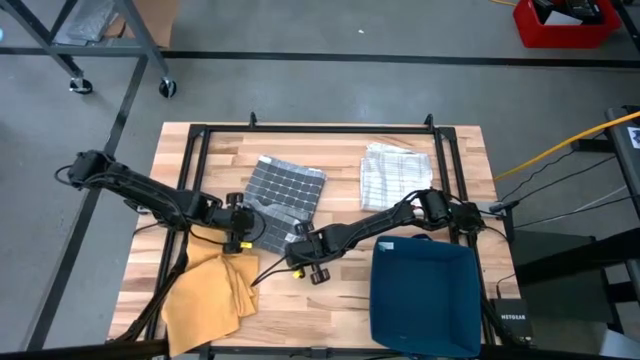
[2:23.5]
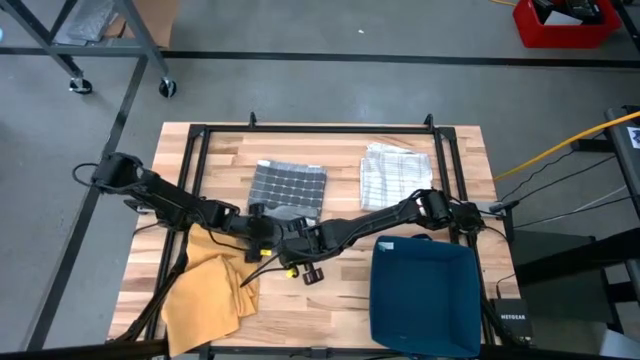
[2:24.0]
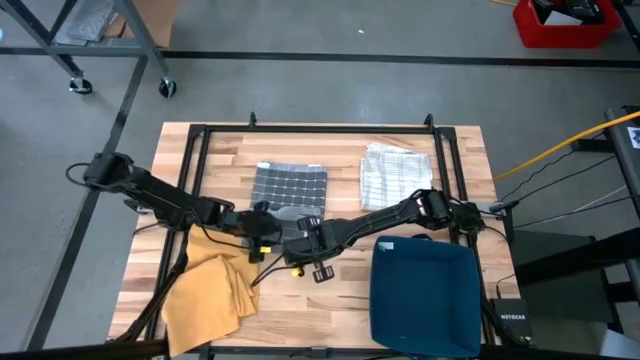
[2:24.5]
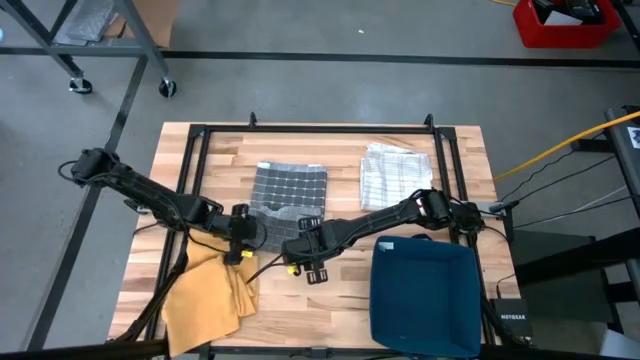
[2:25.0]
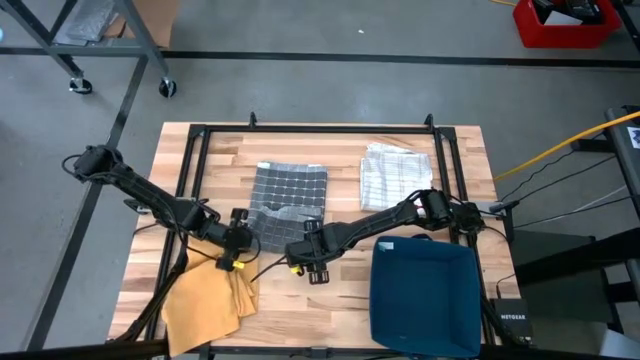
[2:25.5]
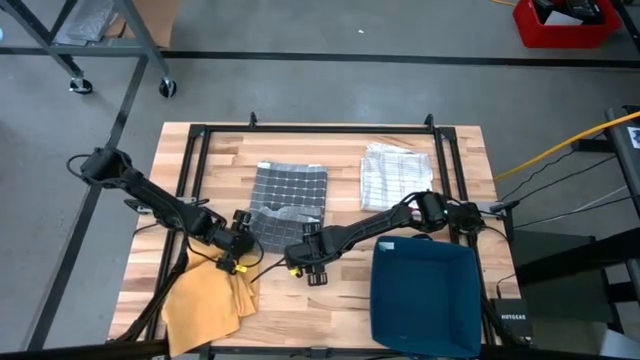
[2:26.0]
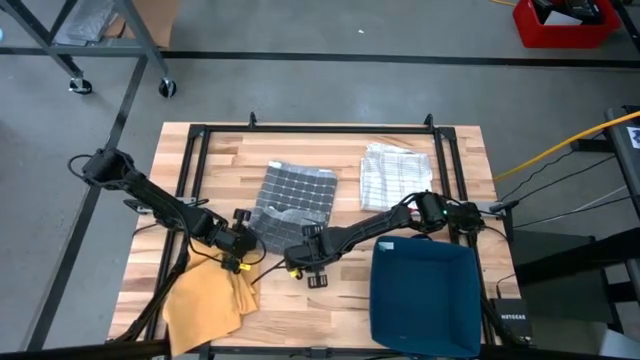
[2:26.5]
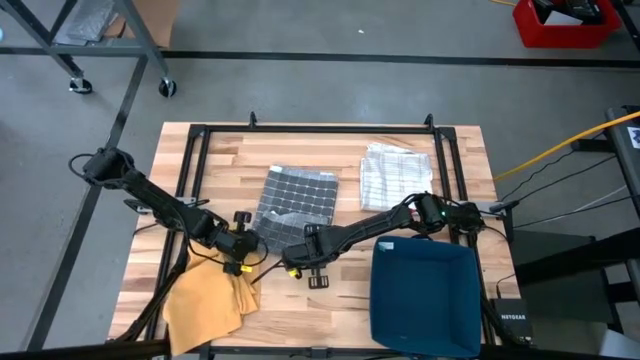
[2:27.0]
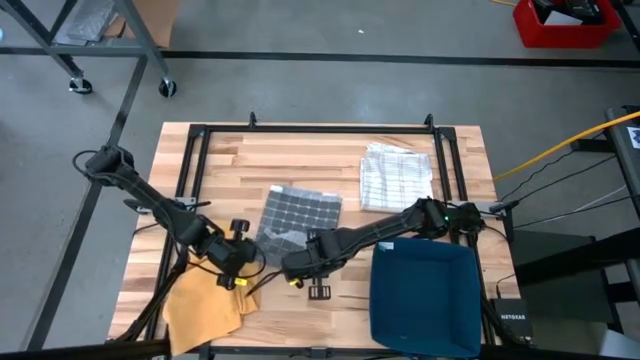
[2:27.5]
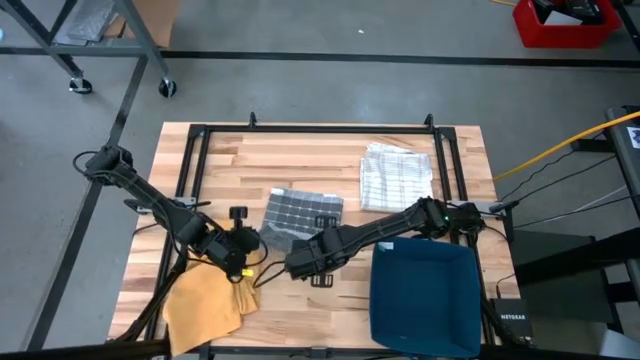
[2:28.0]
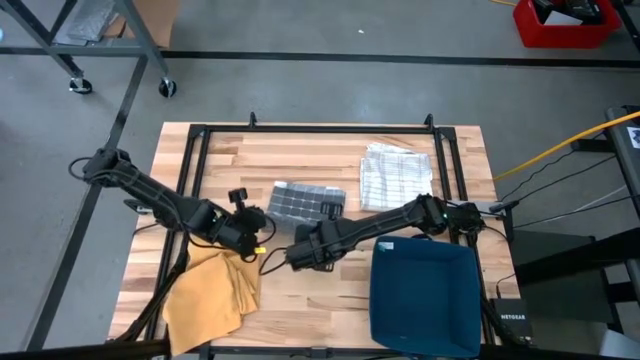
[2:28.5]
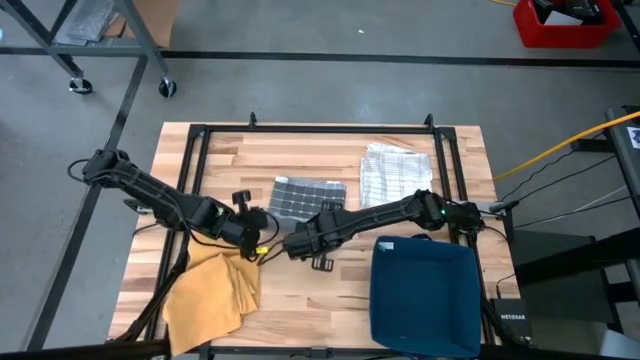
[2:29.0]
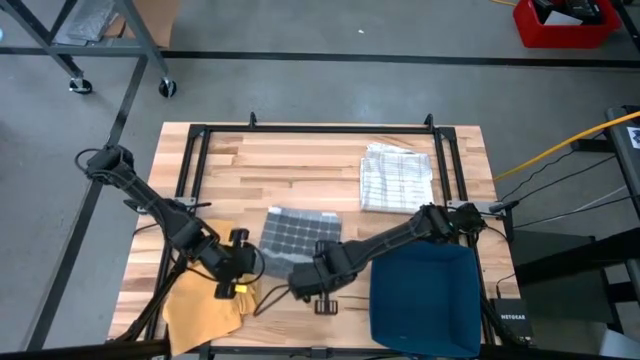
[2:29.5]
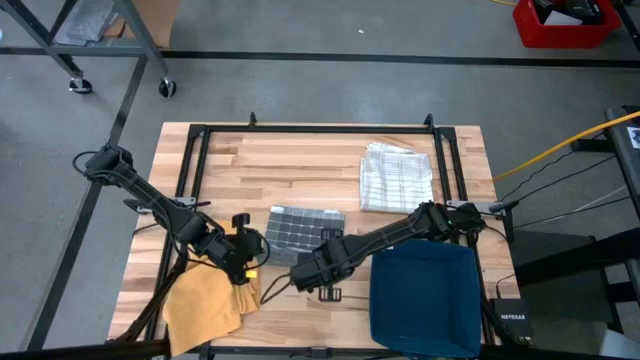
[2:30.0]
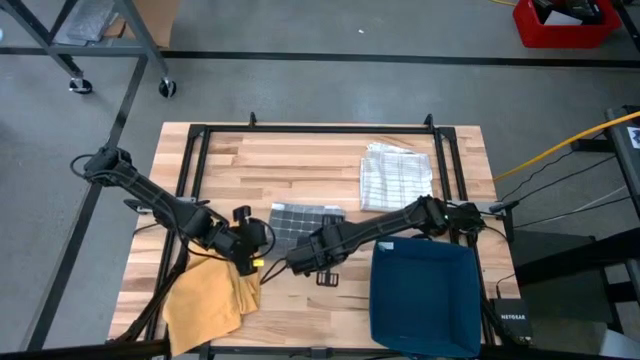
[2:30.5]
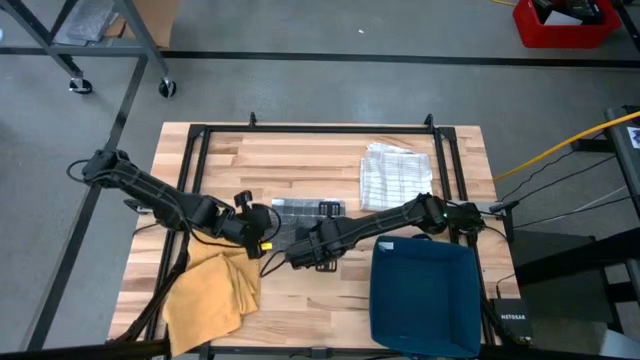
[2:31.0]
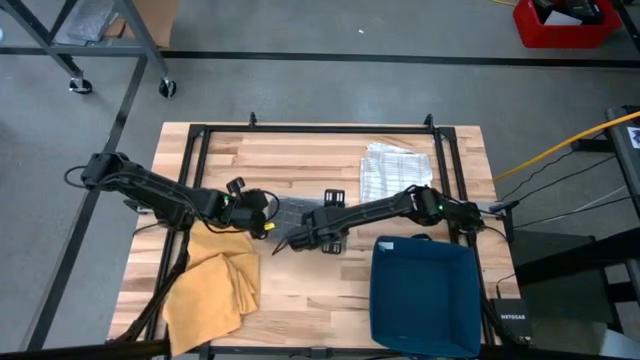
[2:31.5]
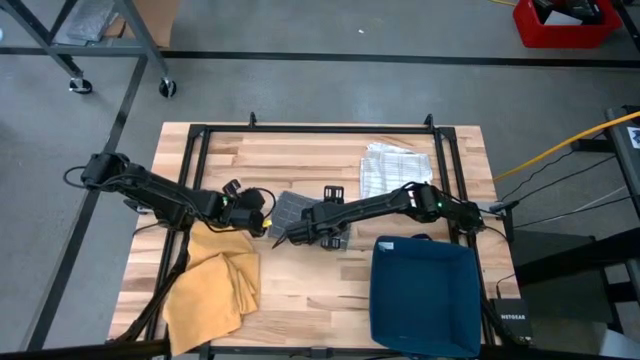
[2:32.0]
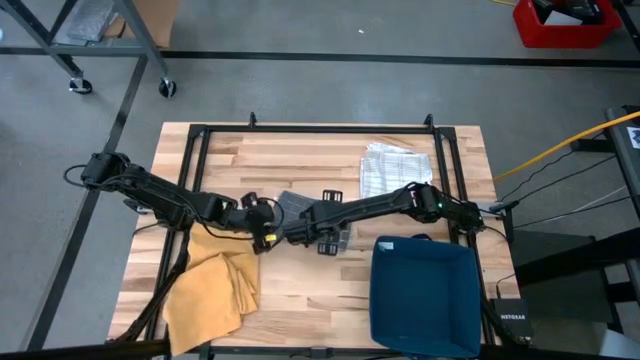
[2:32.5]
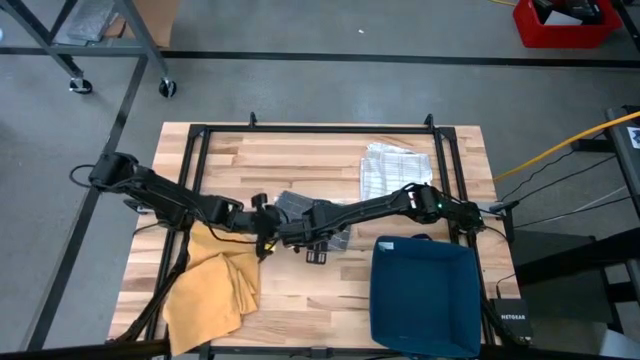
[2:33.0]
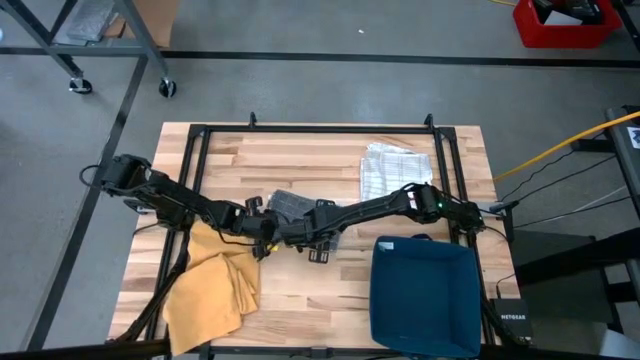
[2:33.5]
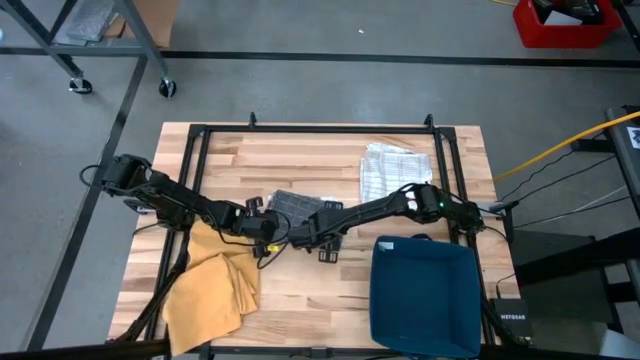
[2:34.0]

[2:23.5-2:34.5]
Task: Fold towel
Fold the gray towel

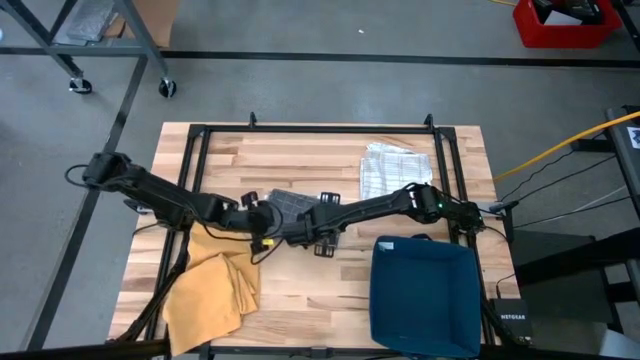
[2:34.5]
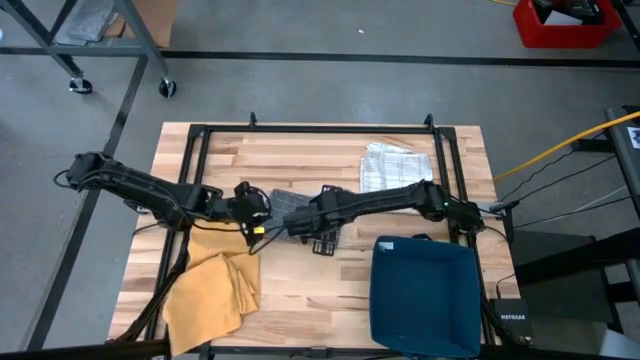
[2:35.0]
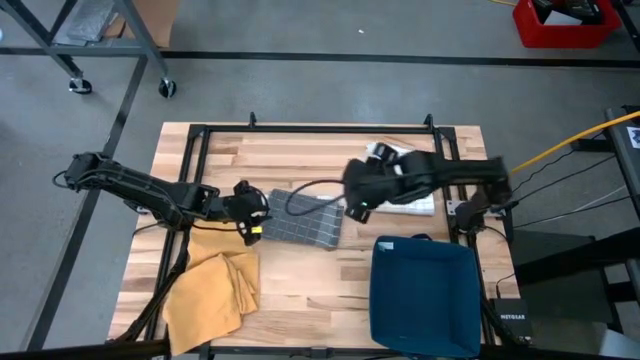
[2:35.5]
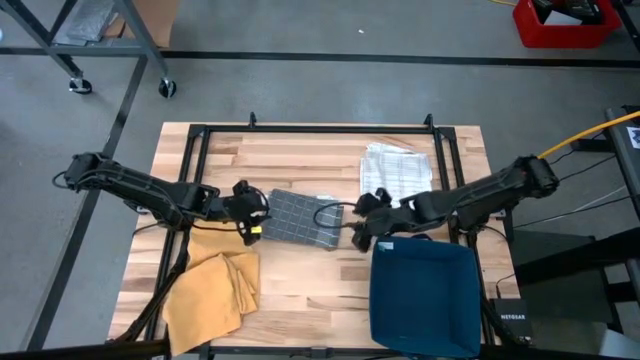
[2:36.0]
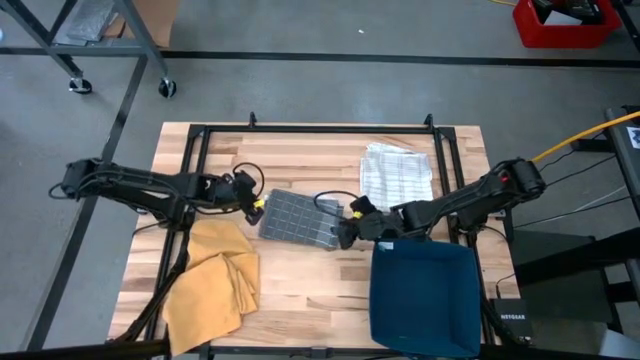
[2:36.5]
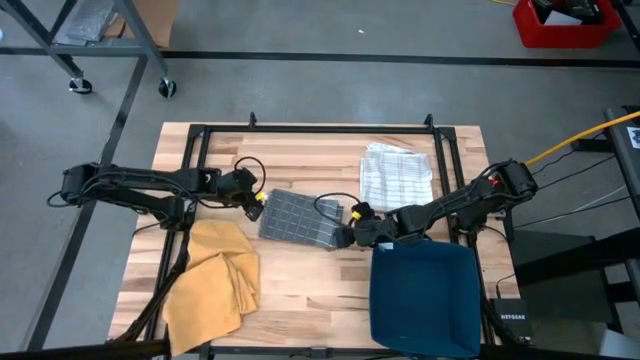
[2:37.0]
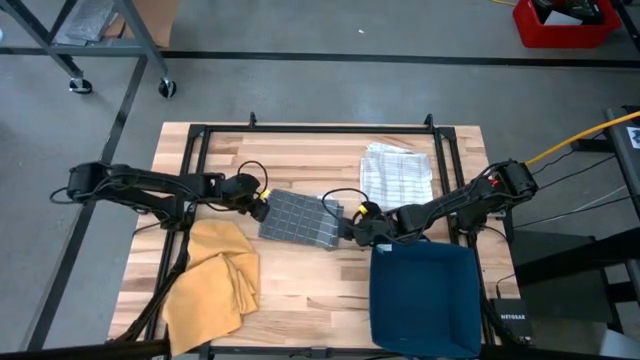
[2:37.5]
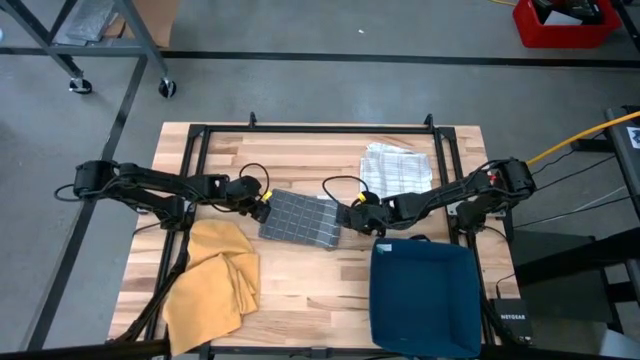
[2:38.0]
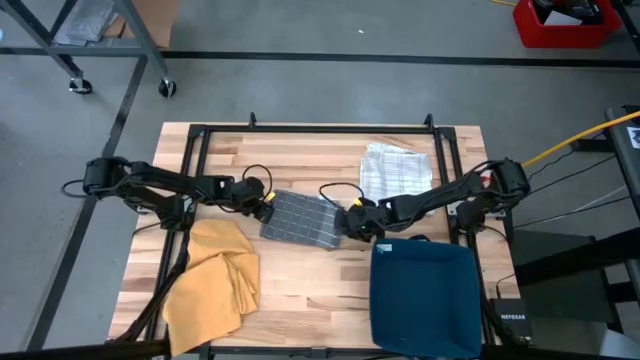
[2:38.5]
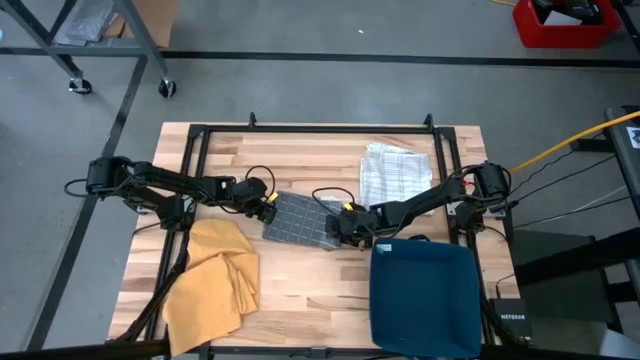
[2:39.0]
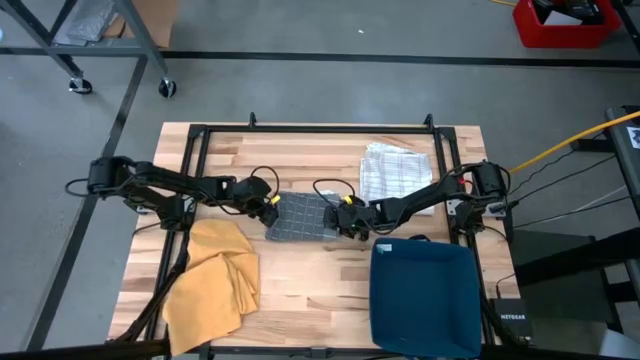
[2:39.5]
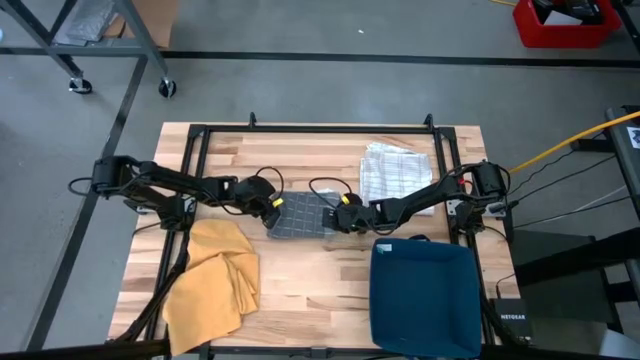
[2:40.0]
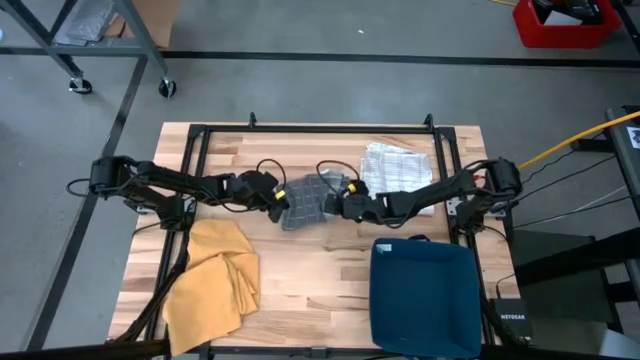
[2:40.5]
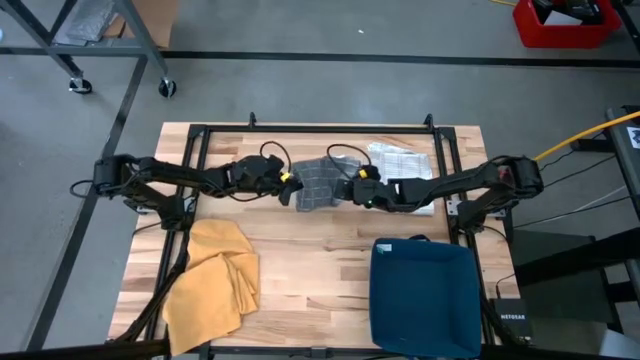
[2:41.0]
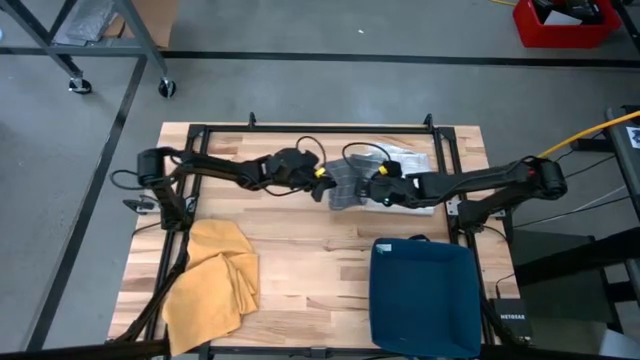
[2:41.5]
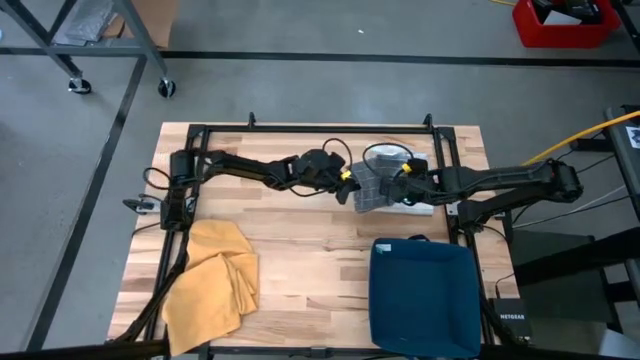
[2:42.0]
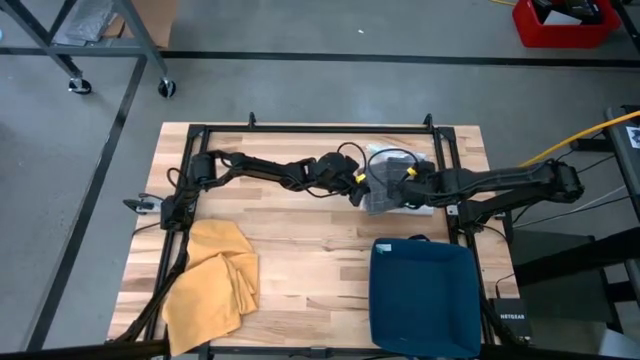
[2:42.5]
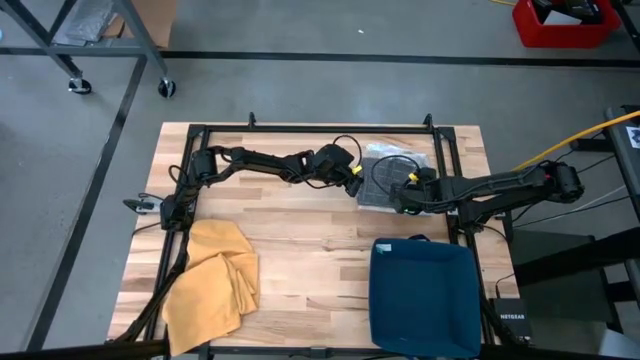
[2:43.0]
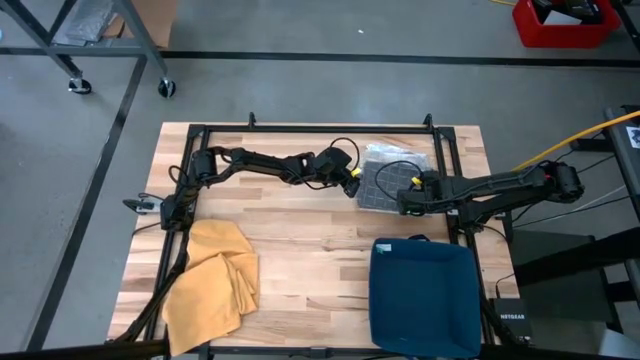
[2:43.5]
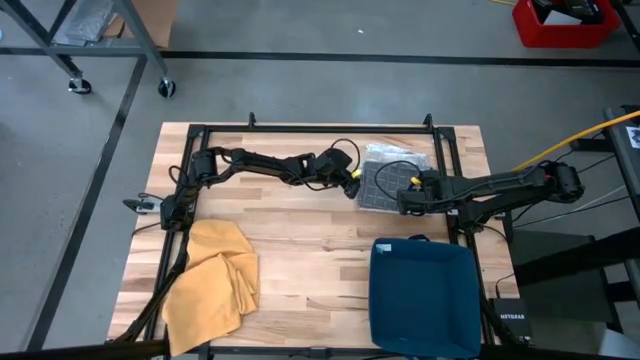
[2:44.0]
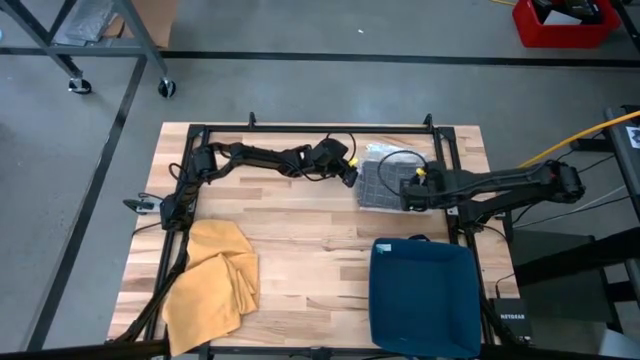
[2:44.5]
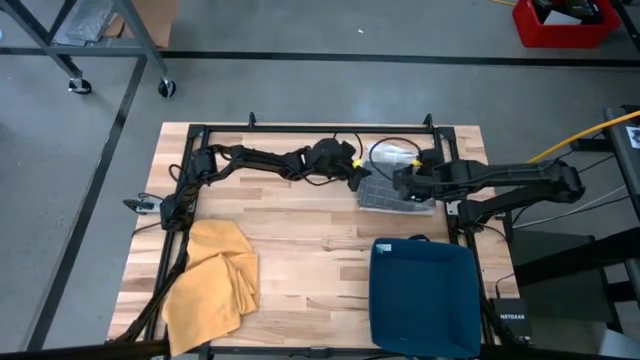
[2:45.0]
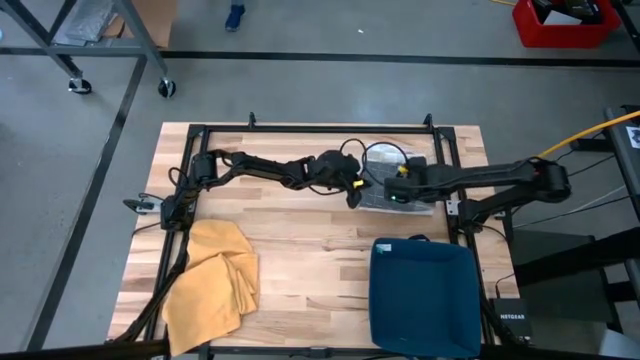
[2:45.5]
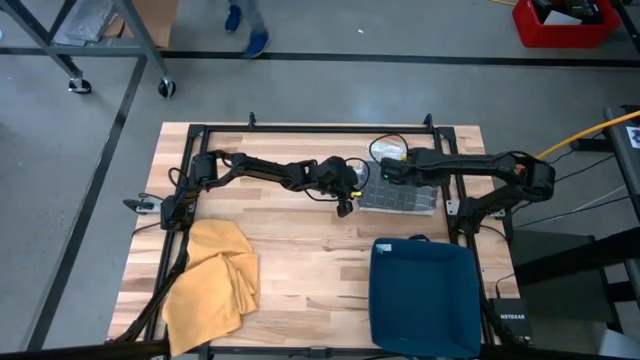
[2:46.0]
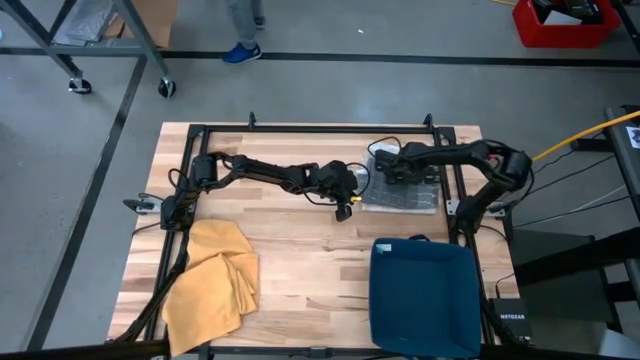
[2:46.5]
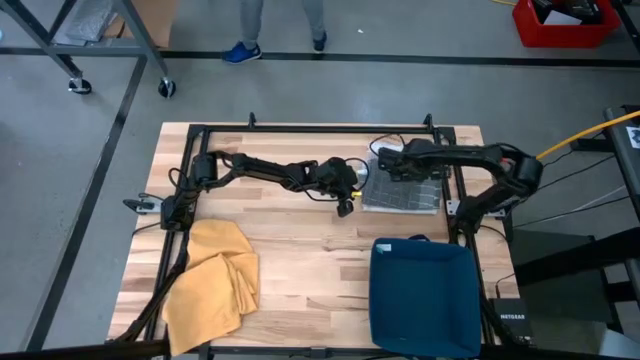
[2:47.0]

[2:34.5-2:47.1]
Stack the gray towel on top of the white towel
